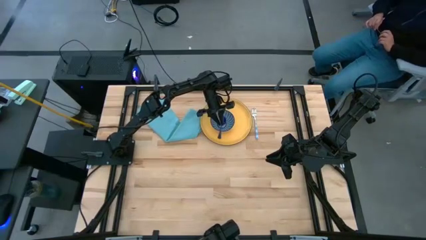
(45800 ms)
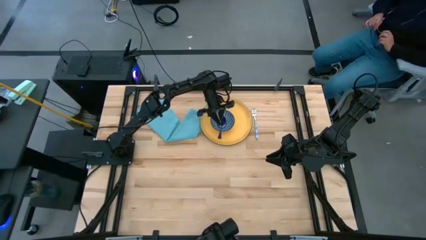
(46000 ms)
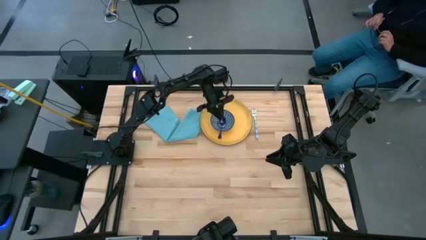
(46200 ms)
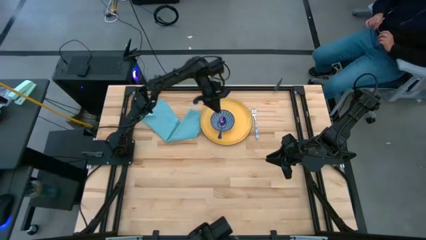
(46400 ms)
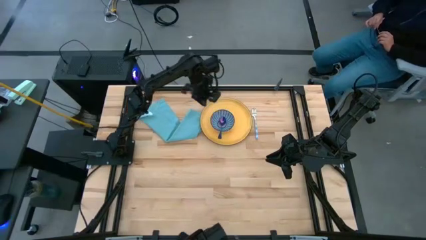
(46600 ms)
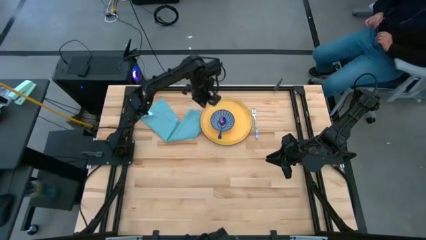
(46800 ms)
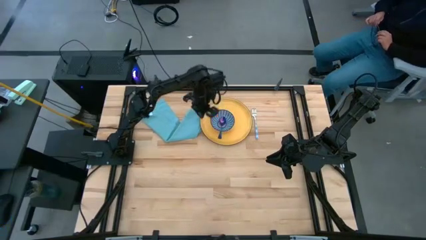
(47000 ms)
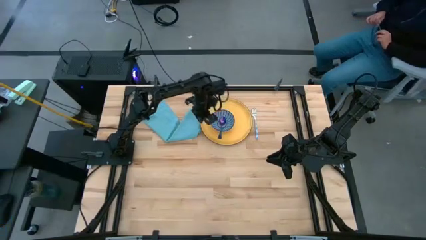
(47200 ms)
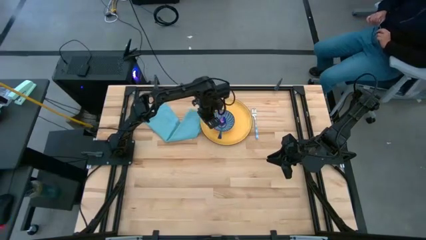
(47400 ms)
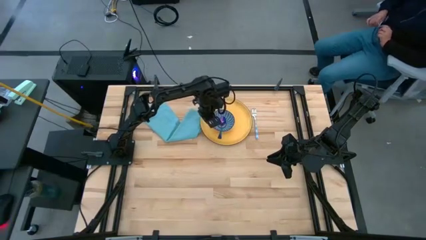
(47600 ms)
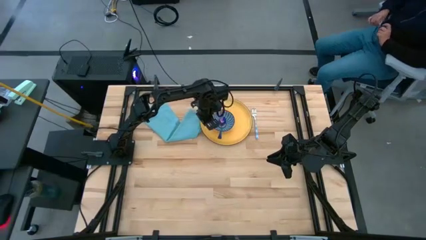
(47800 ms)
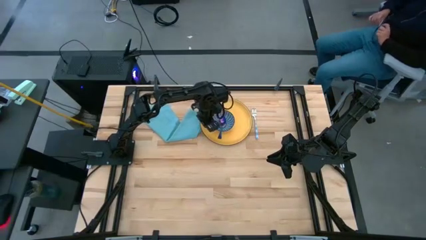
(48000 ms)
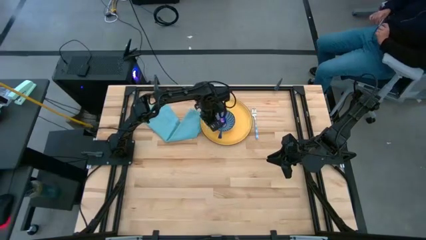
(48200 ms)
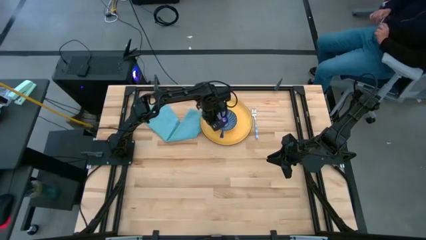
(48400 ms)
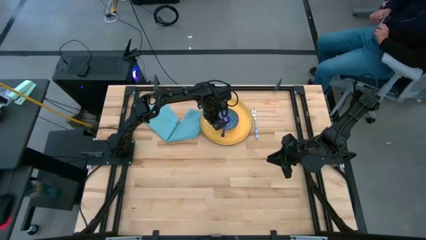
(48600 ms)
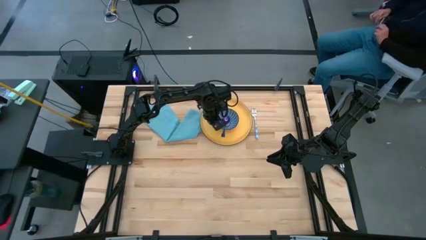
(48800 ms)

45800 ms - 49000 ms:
Task: Set table place
Adjust the blue bowl on the yellow plate

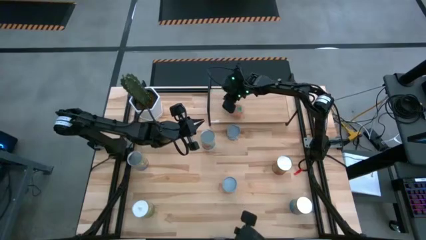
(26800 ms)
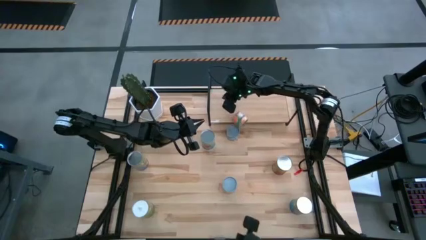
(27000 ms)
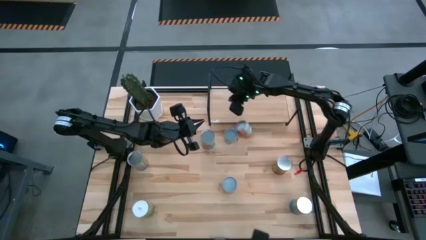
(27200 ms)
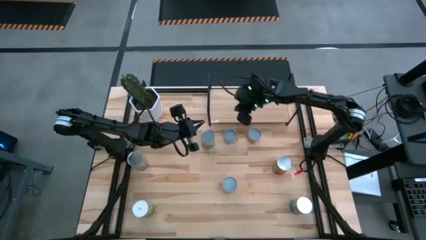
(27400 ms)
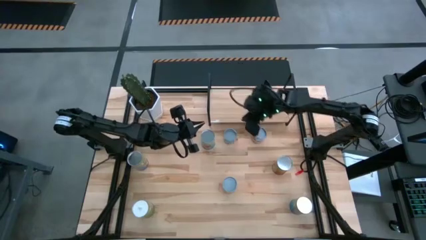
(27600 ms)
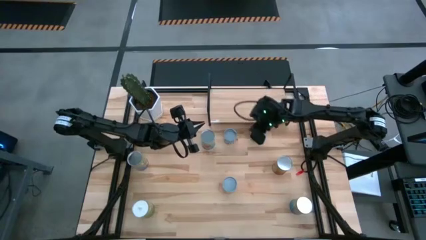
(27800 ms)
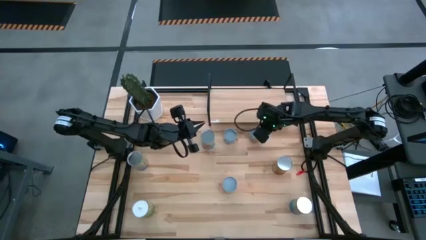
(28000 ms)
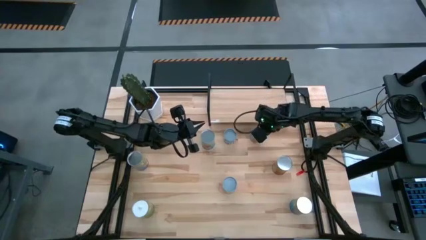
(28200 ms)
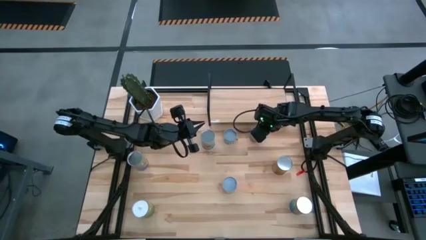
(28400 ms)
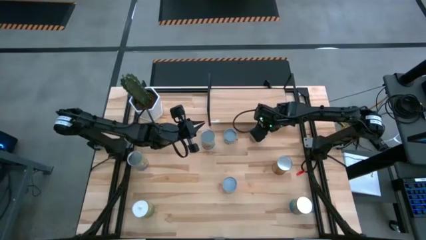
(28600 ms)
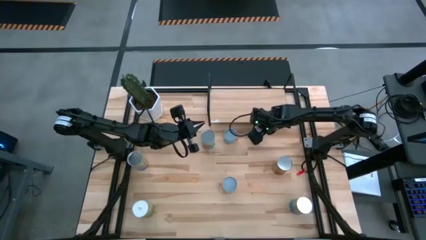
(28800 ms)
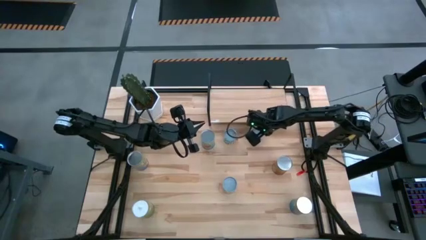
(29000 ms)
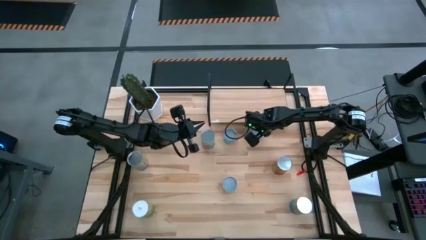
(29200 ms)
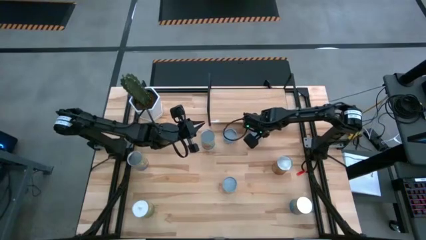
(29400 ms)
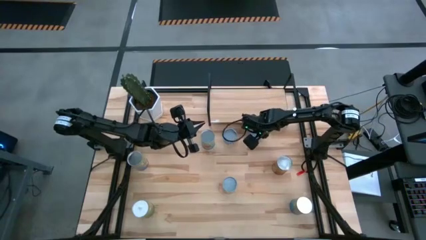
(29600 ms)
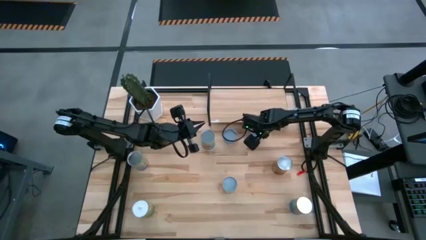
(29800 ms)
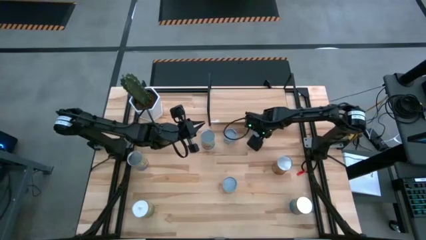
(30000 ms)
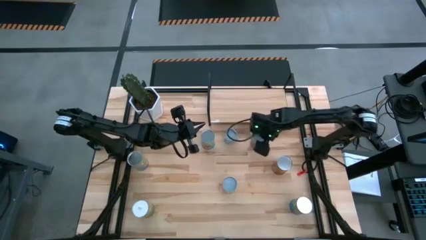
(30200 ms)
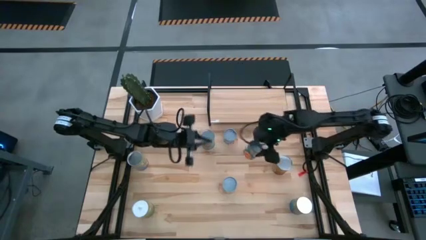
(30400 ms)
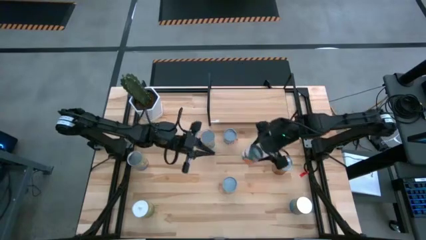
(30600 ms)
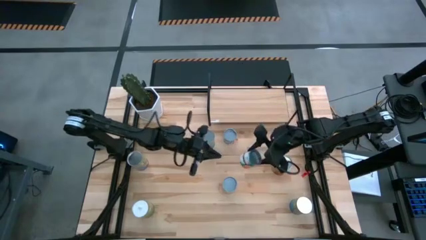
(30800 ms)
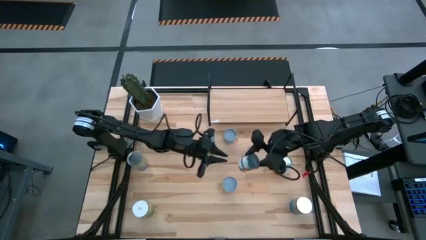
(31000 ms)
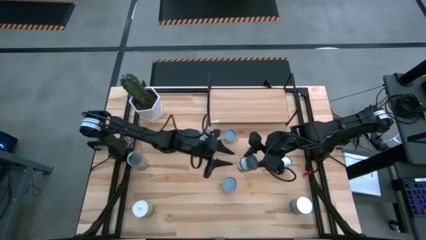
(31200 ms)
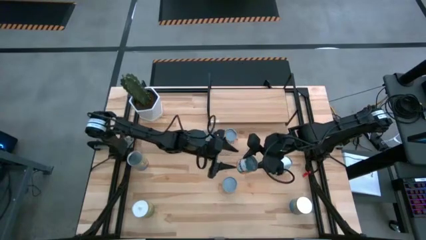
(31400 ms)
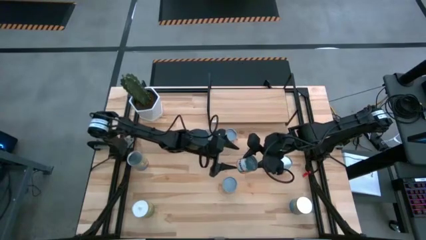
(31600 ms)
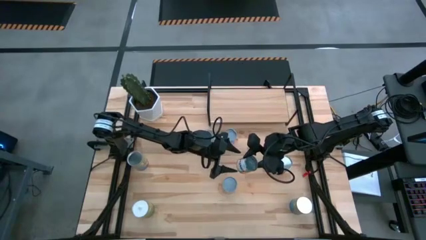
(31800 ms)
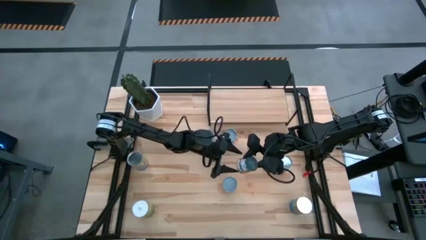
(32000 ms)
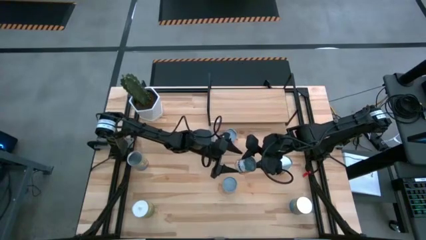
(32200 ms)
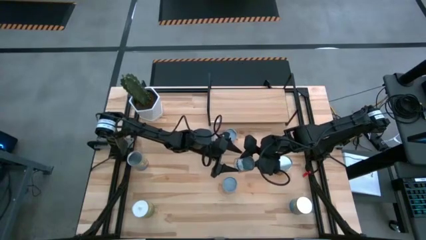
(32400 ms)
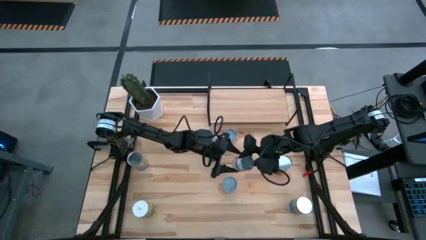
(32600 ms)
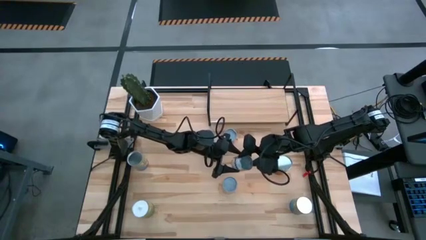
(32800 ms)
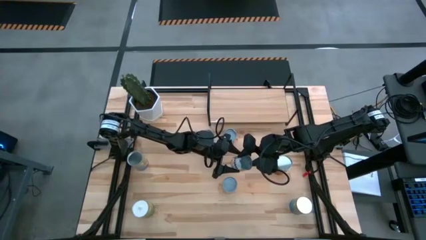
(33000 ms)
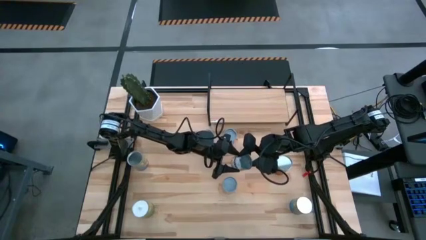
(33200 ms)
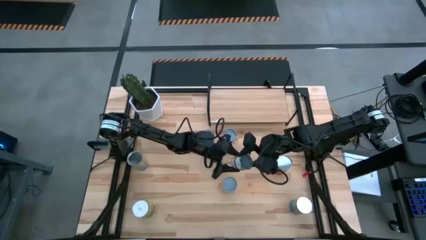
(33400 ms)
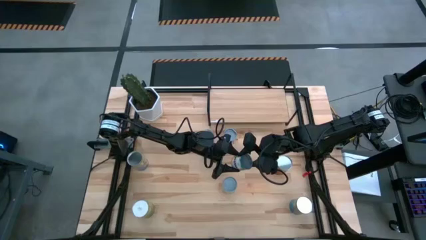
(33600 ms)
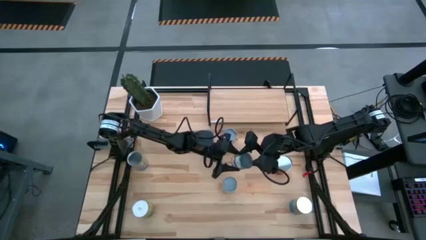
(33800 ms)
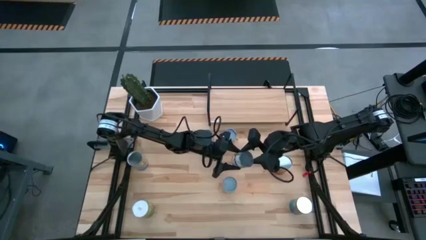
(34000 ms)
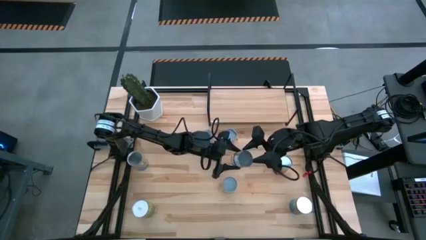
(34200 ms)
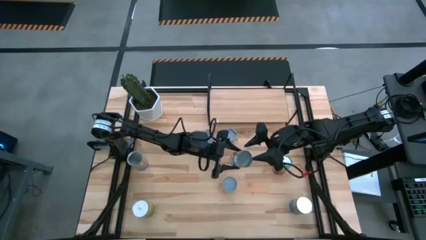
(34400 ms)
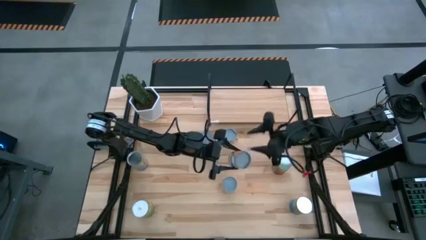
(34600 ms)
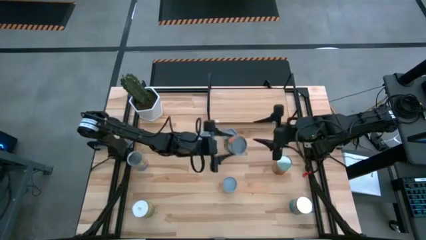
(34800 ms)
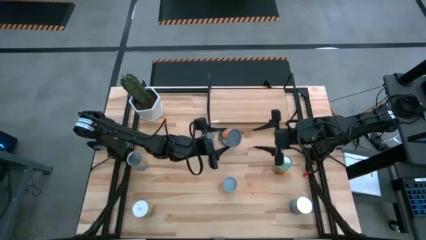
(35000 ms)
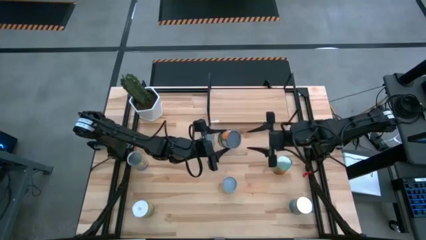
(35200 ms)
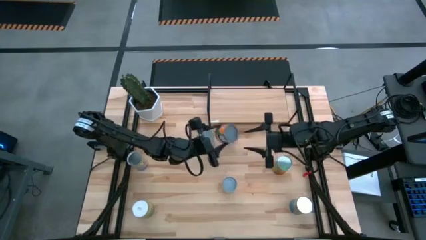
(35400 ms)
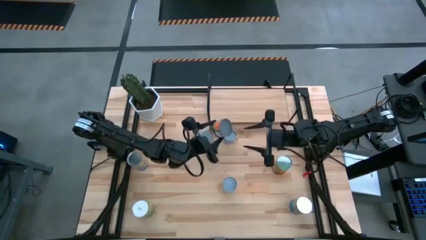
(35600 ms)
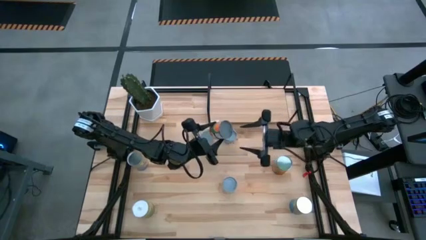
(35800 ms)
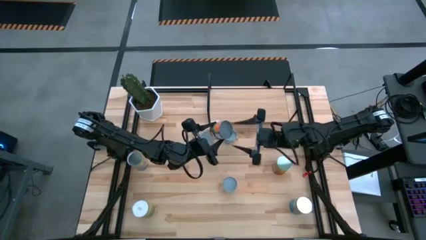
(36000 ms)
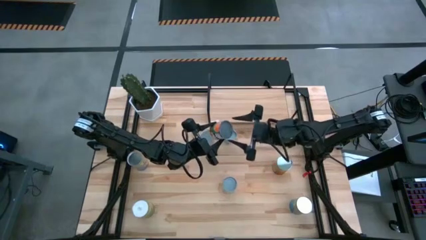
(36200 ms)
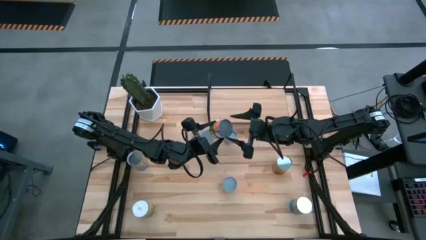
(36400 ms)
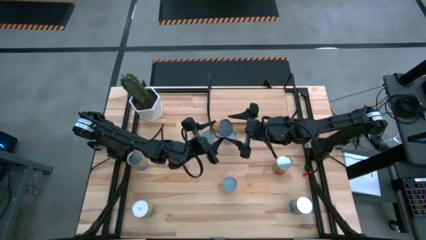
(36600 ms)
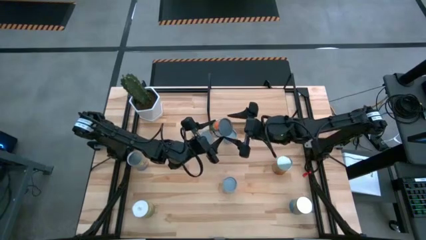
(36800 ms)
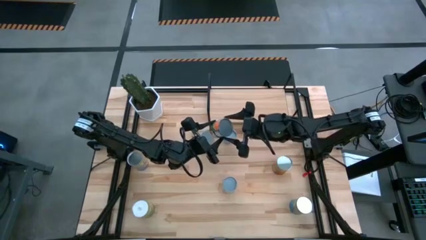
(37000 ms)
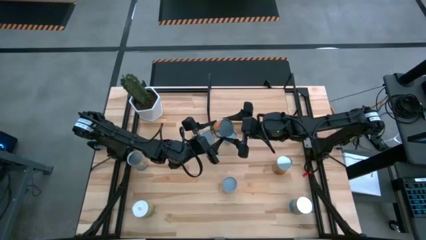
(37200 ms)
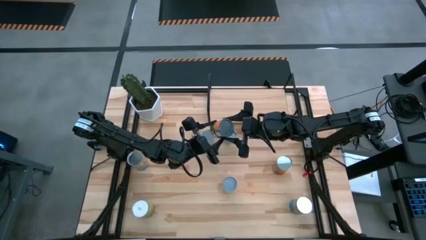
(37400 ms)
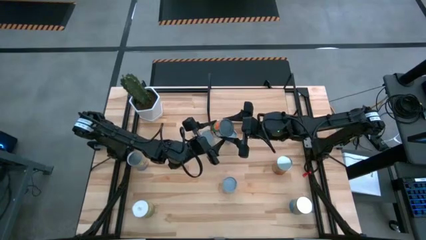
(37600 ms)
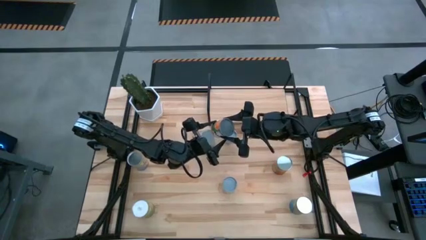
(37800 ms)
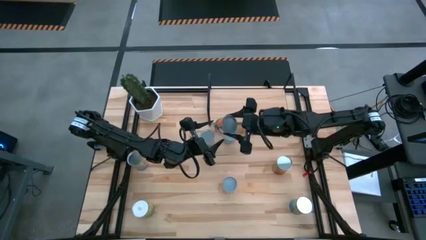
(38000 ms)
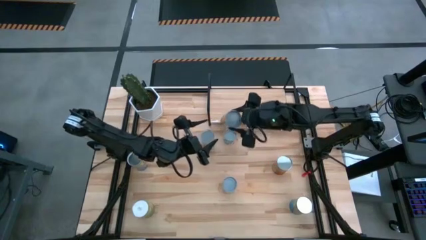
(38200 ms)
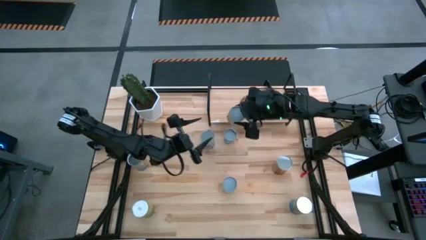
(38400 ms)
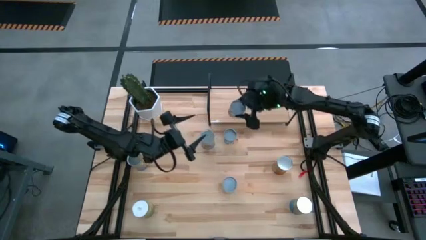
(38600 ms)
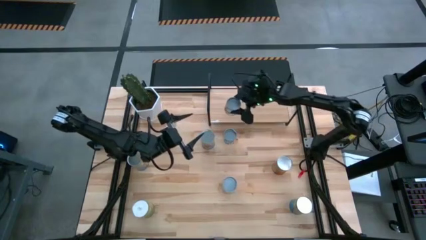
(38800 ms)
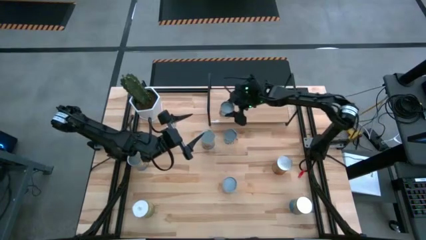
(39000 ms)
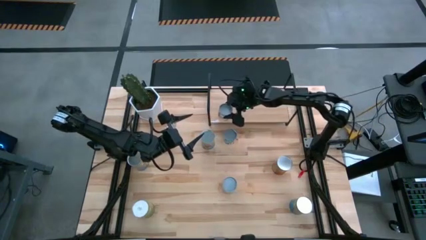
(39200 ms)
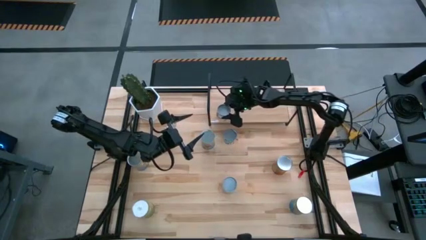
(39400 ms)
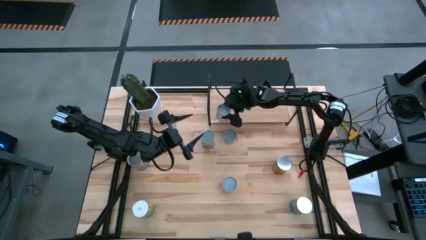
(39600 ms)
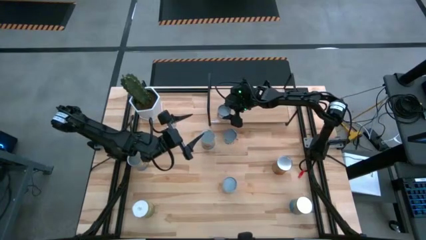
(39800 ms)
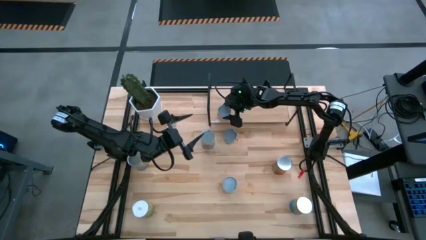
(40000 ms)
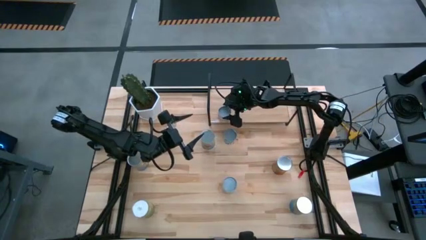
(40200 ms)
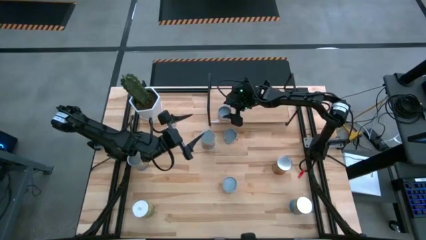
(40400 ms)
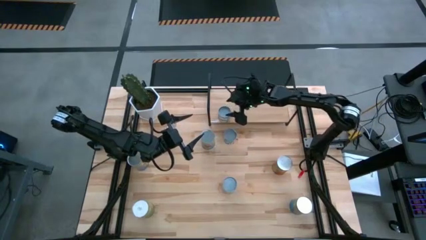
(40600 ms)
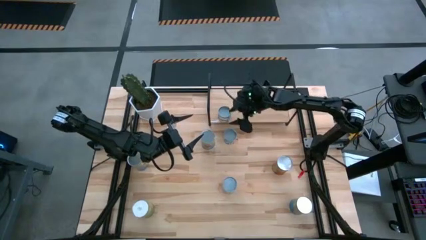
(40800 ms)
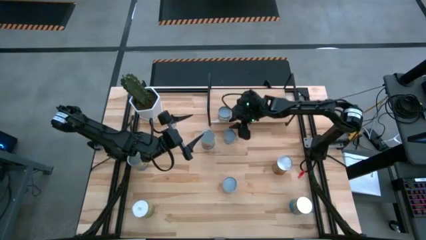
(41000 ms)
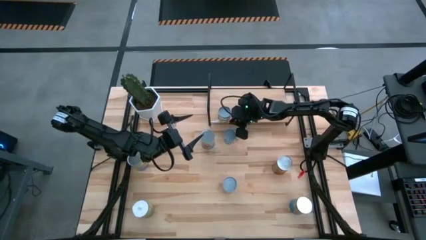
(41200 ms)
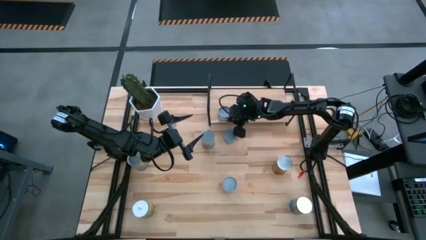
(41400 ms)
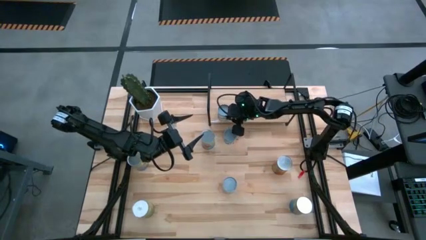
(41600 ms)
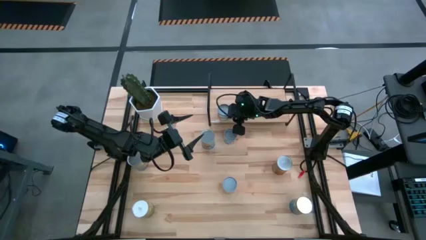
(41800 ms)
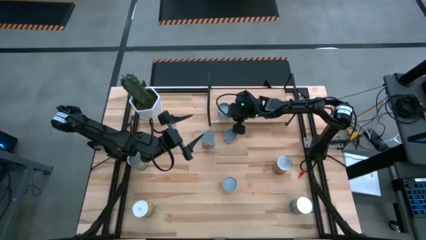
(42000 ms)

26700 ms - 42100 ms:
Task: Pick and place cans onto a shelf
Put the small canned oranges on the shelf
